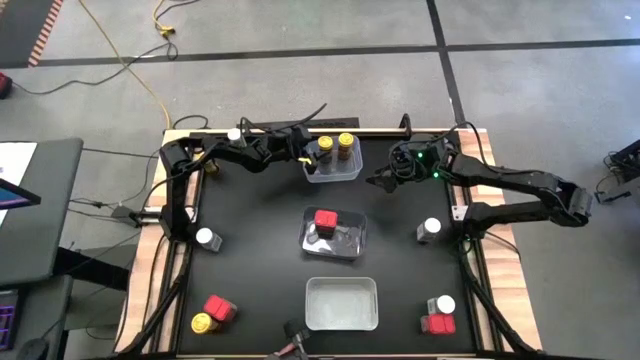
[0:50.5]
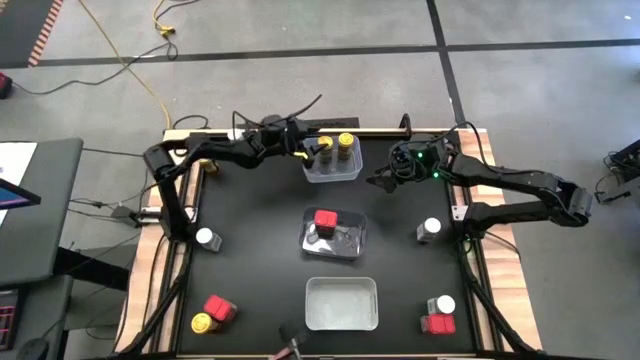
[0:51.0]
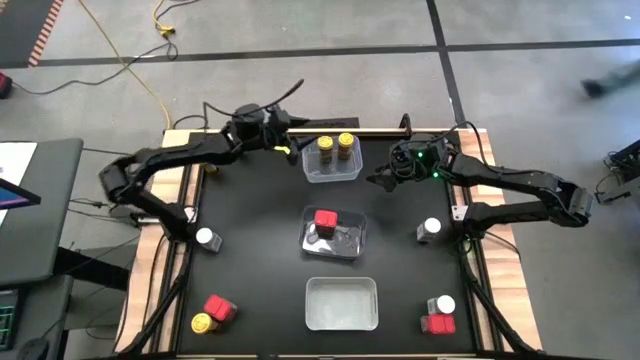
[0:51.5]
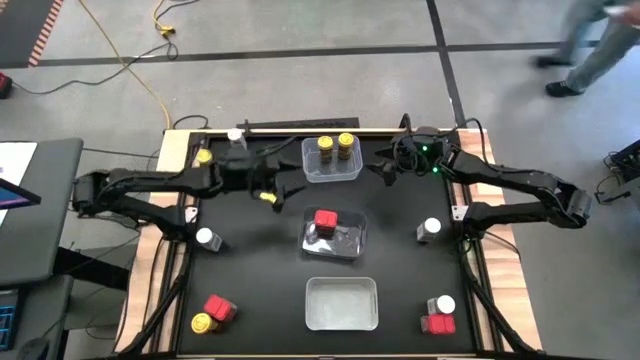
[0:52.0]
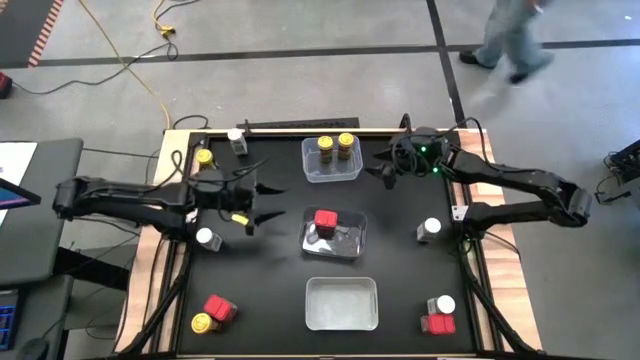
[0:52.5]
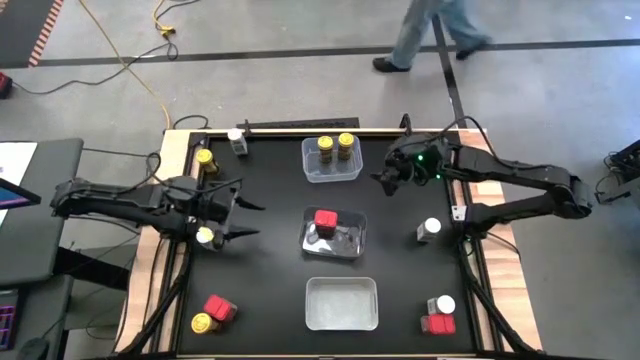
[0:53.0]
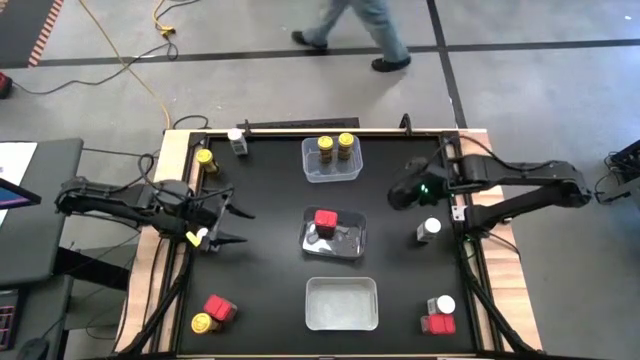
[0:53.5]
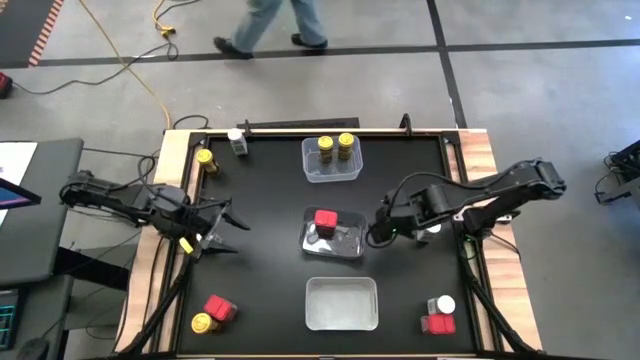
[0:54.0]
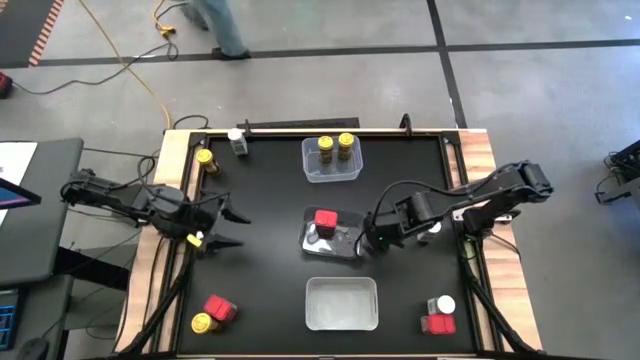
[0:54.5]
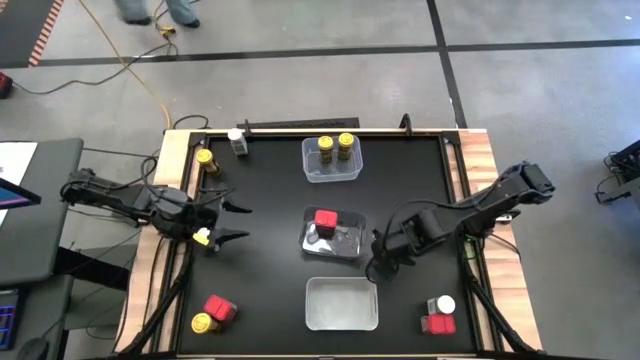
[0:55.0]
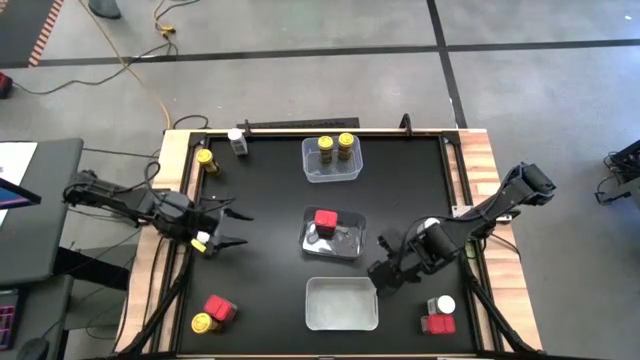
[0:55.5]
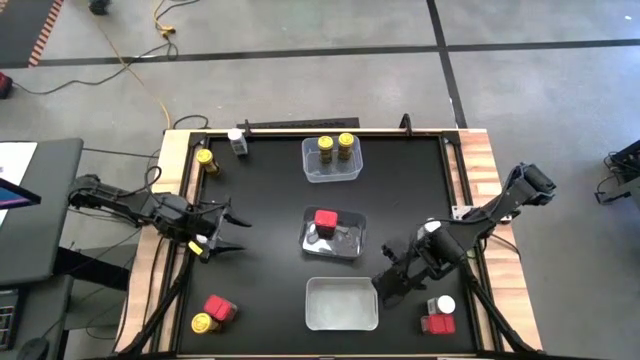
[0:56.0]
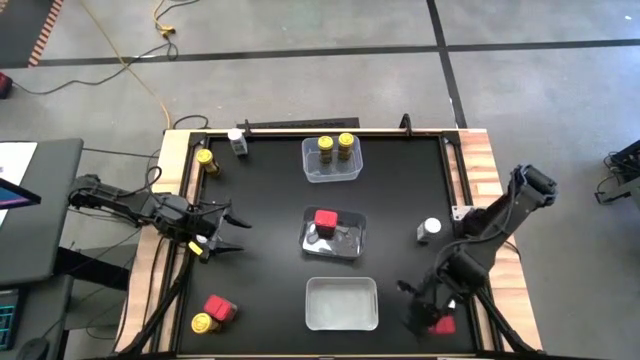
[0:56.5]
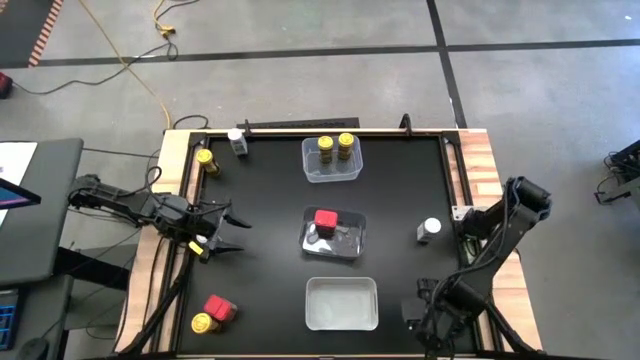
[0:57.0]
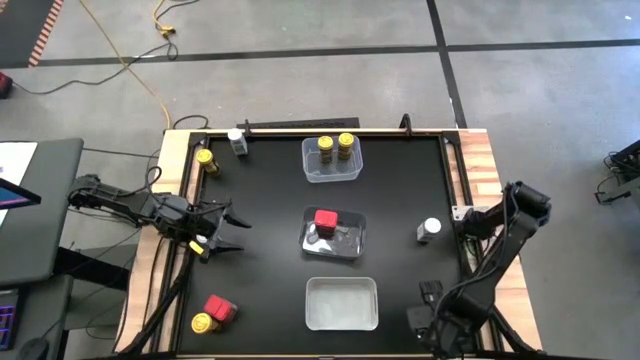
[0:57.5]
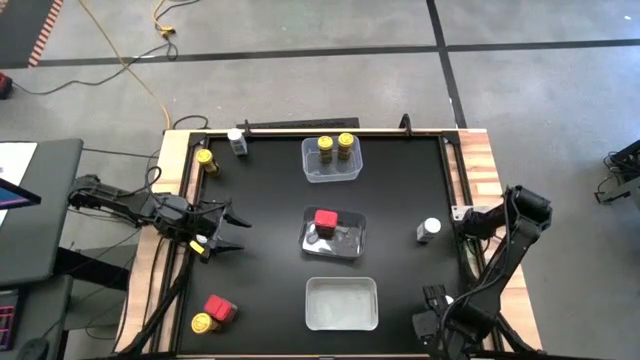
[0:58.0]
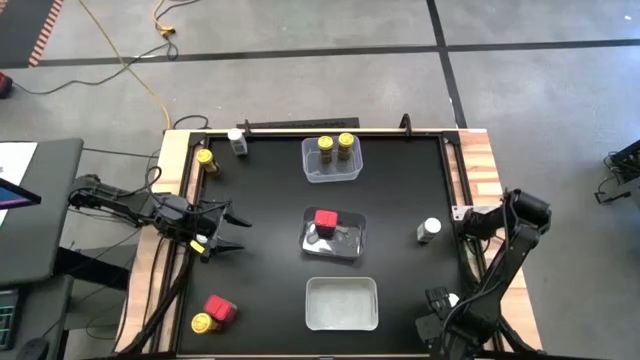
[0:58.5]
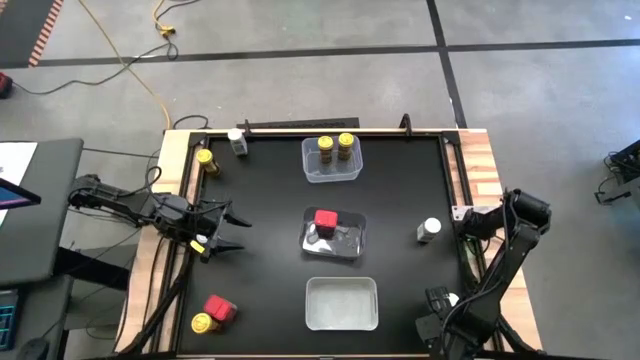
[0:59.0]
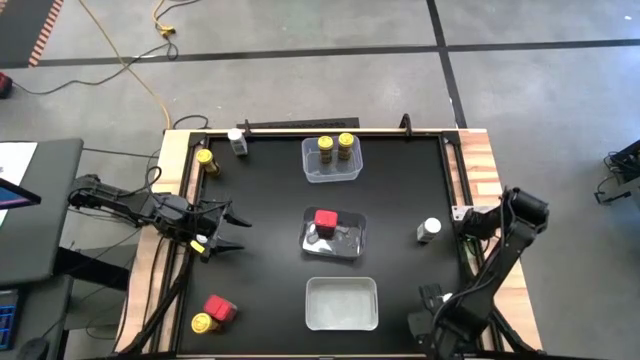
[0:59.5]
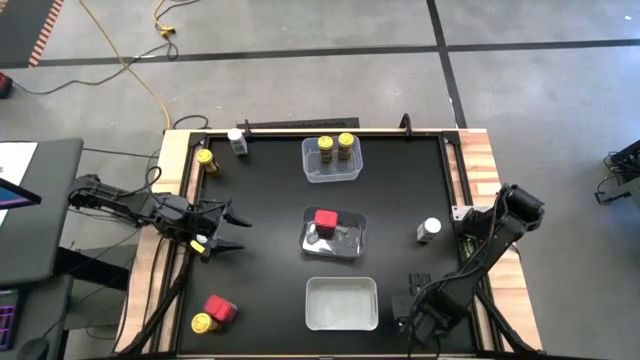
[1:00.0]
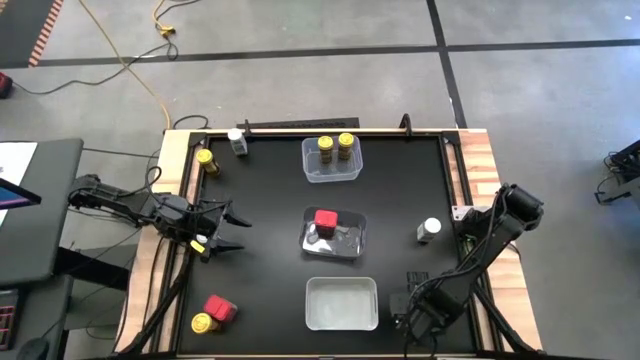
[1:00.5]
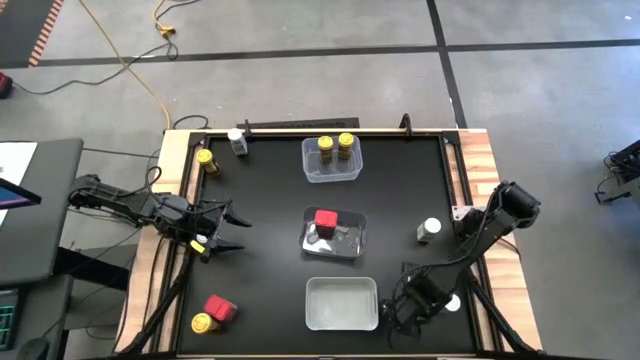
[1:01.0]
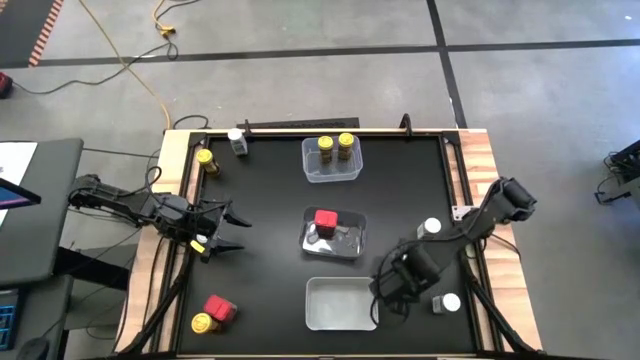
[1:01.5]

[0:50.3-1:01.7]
Task: Sort spices by type
Put the right red seasoning can into the black bin

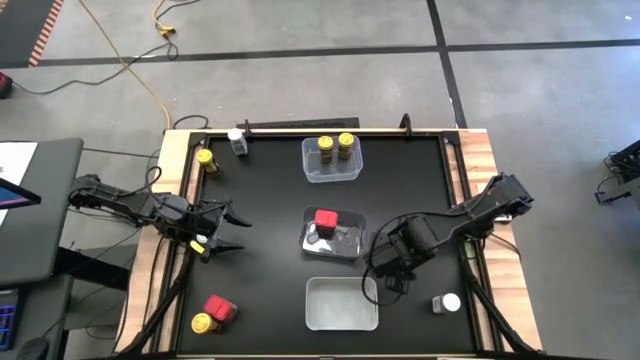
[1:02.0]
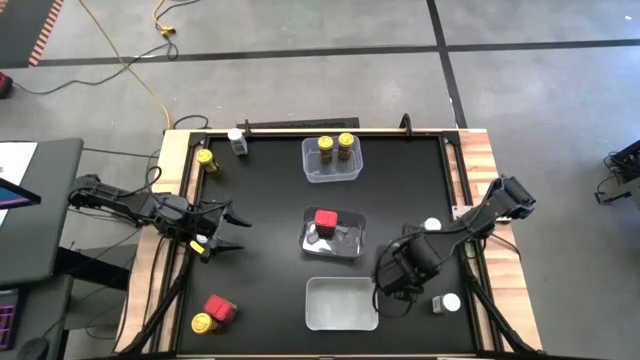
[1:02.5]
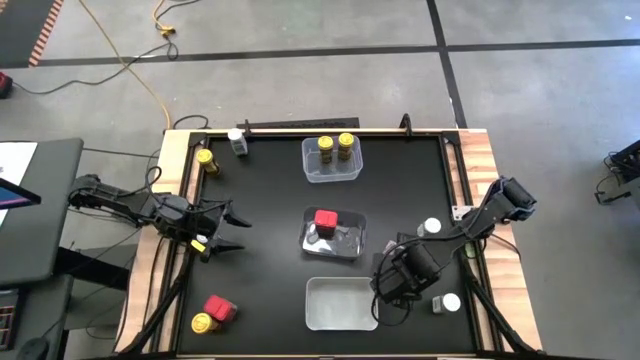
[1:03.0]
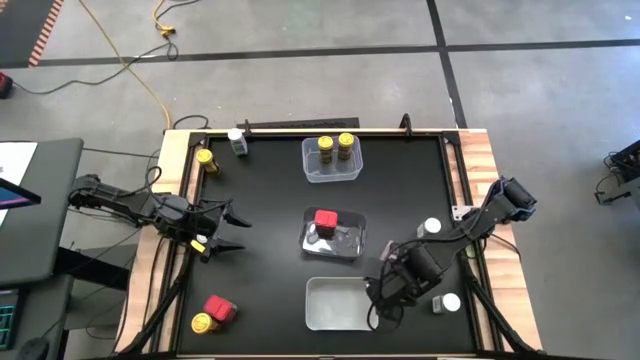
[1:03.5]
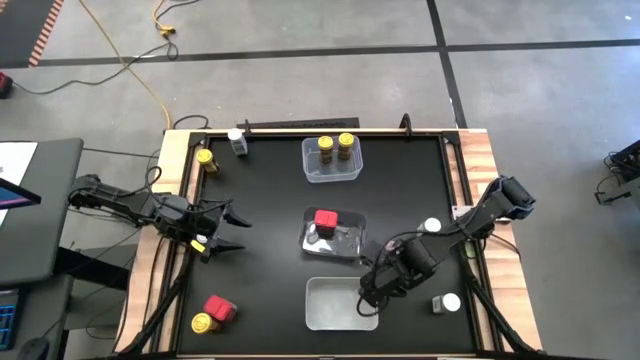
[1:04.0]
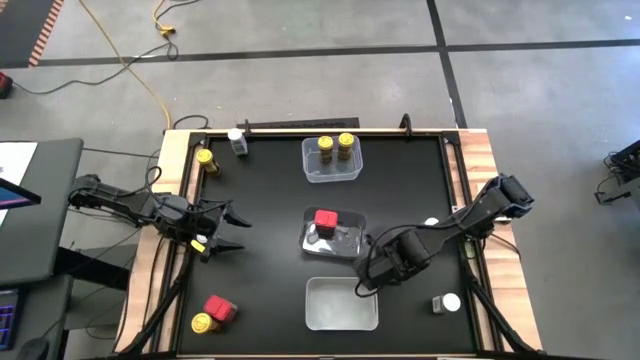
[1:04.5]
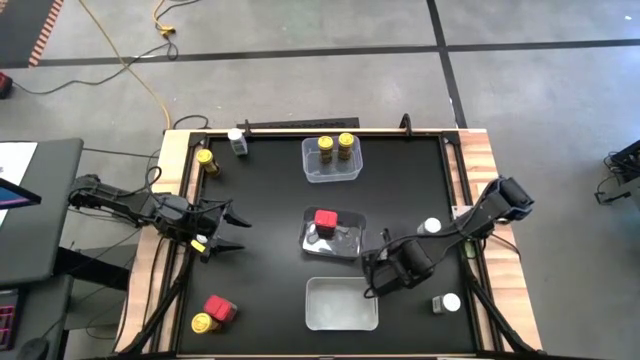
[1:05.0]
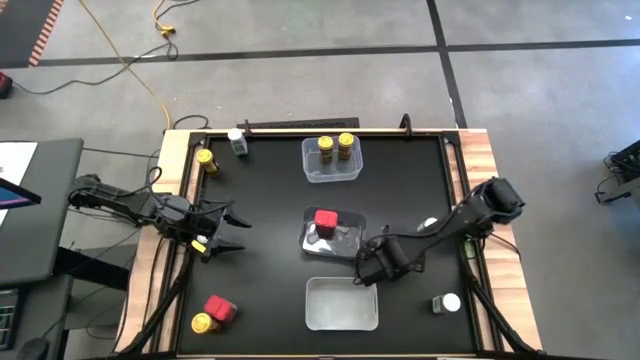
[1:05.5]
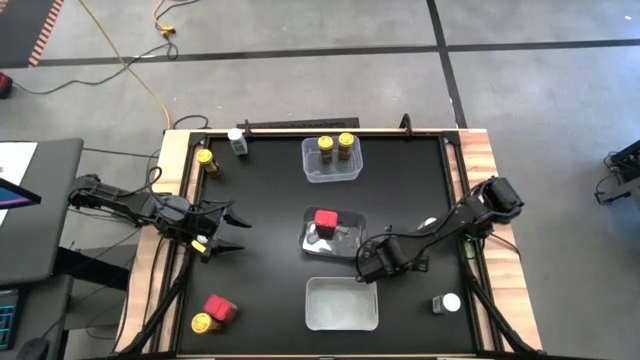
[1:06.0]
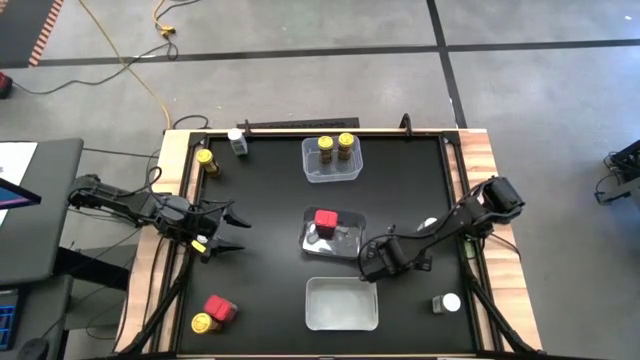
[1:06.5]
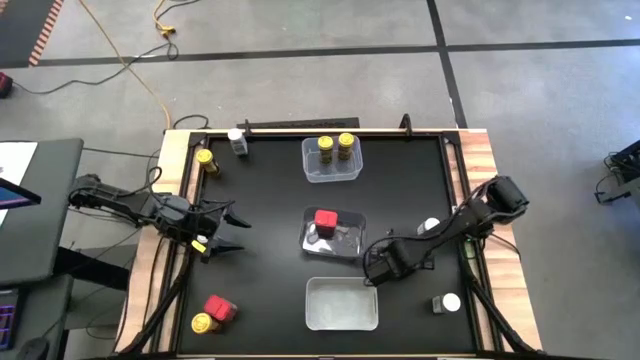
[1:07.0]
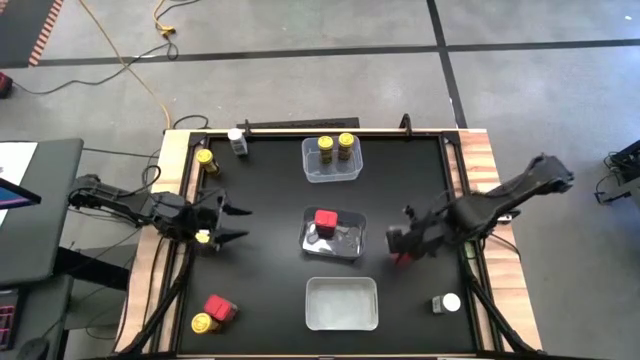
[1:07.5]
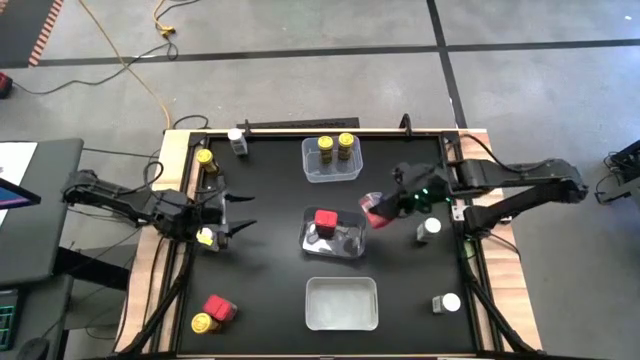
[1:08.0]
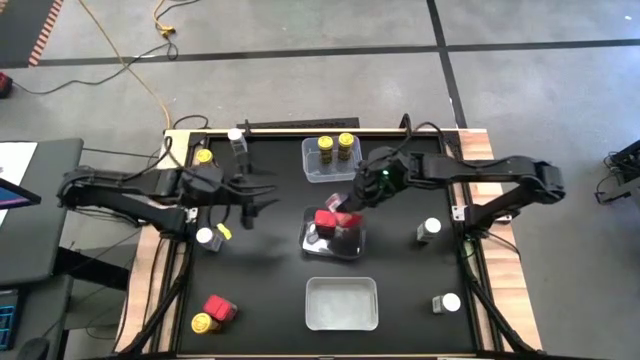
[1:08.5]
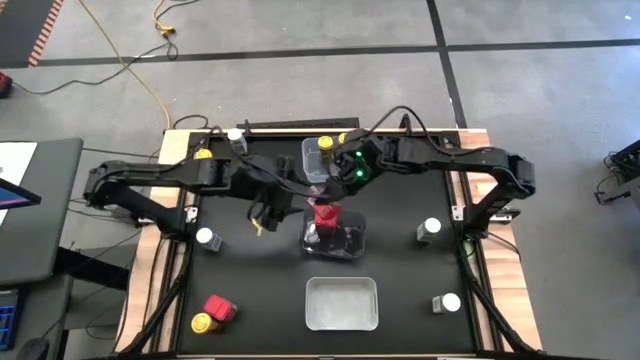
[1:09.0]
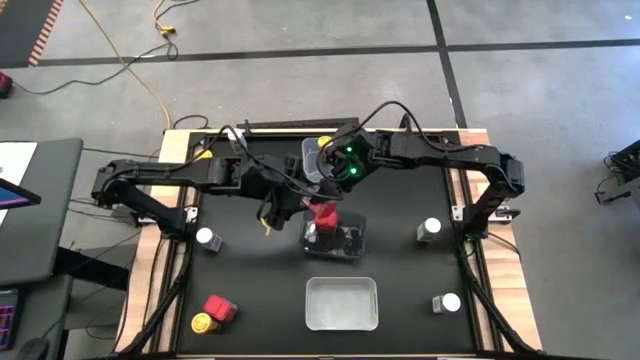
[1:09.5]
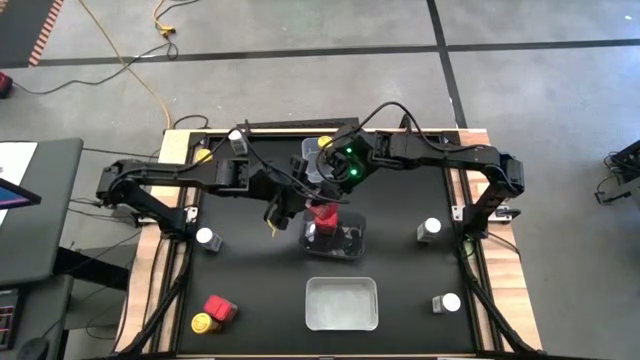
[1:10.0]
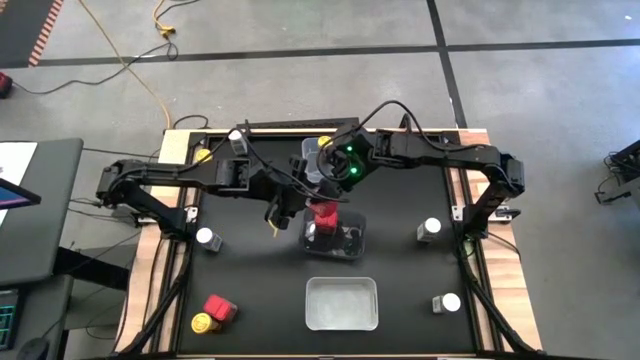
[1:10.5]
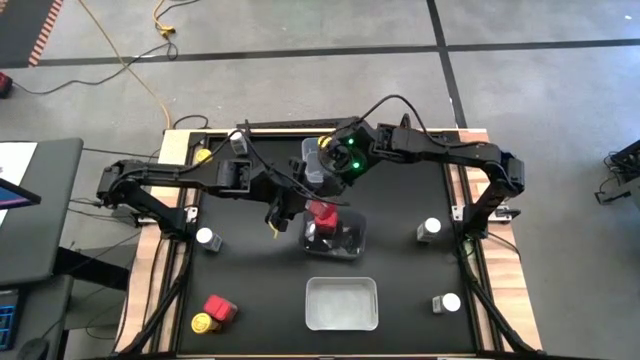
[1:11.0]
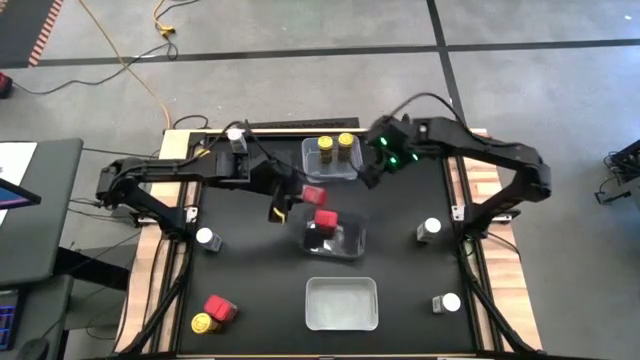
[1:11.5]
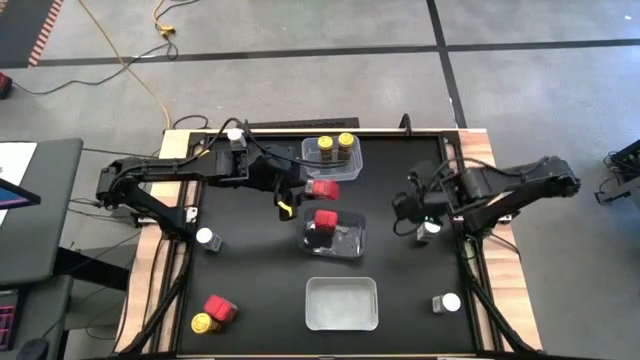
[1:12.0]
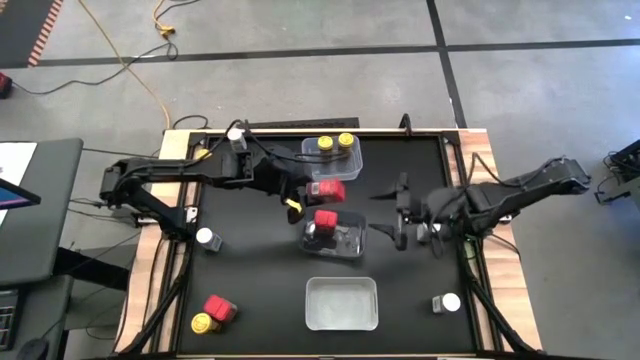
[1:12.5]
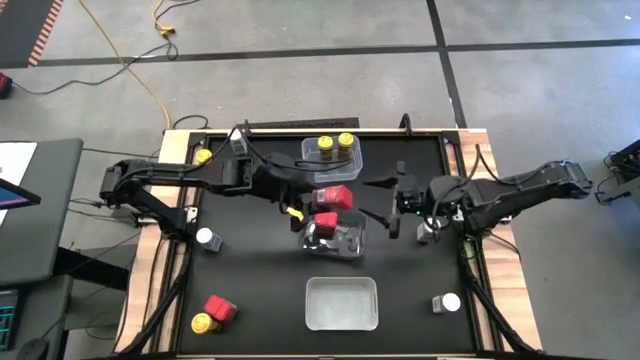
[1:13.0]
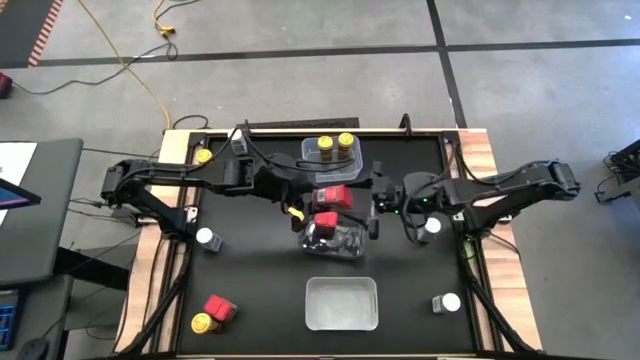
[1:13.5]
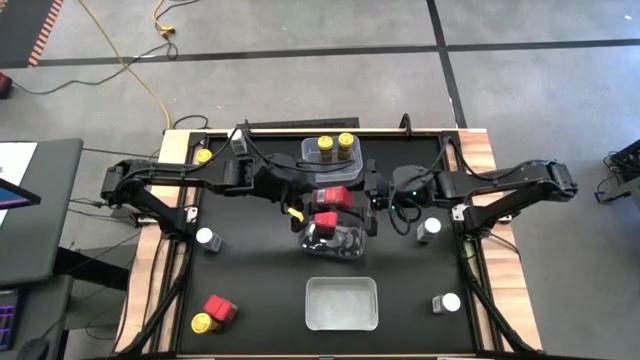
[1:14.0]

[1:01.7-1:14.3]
Put the right red seasoning can into the black bin
